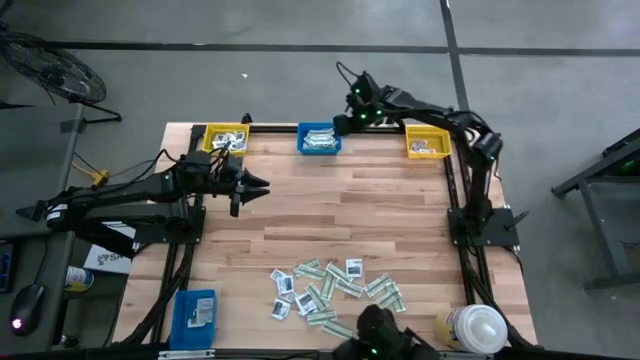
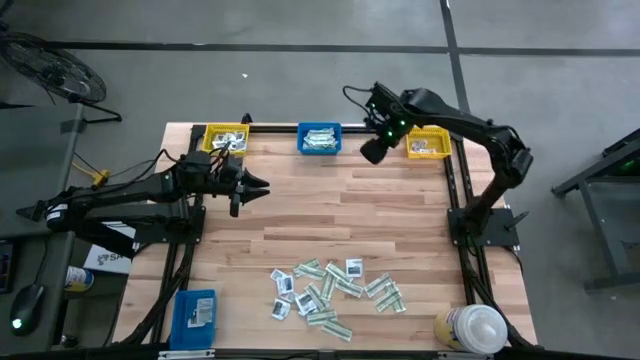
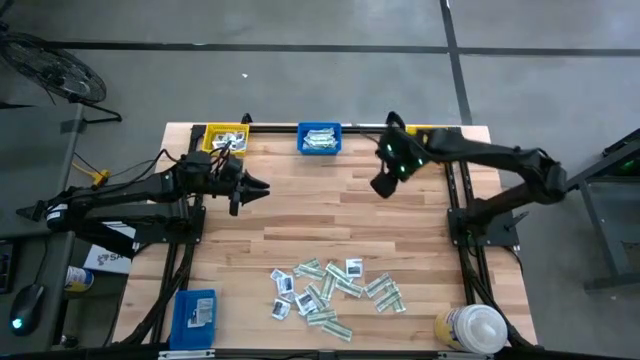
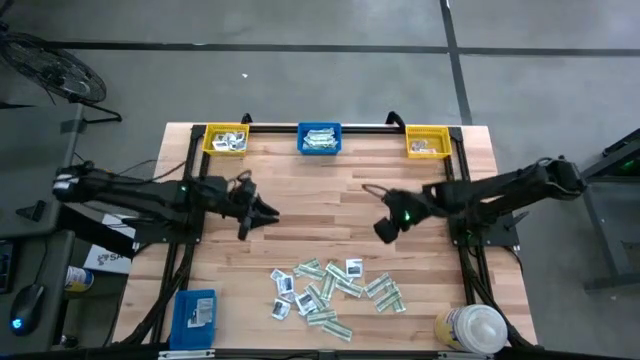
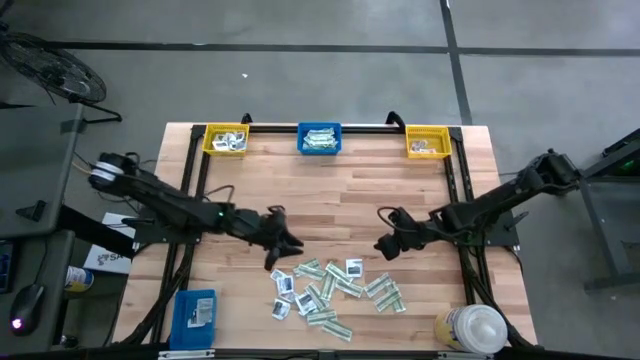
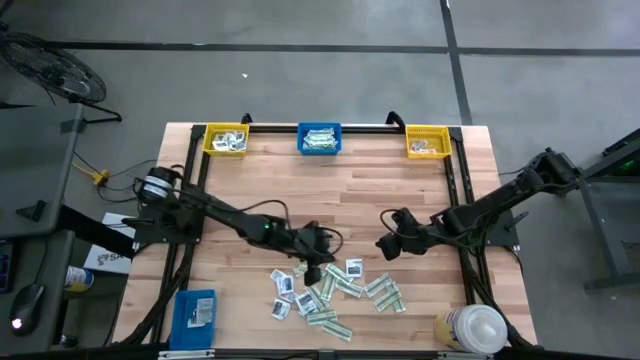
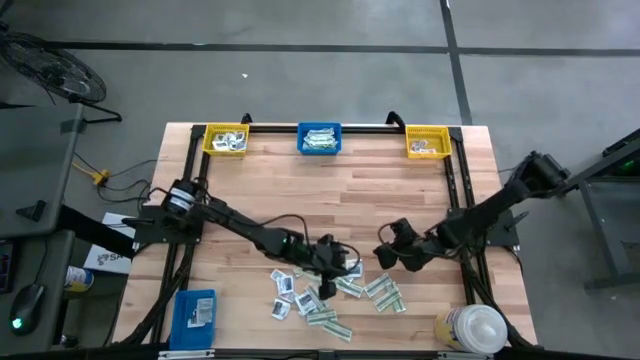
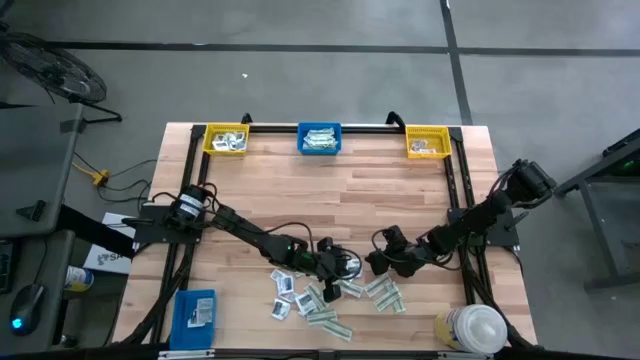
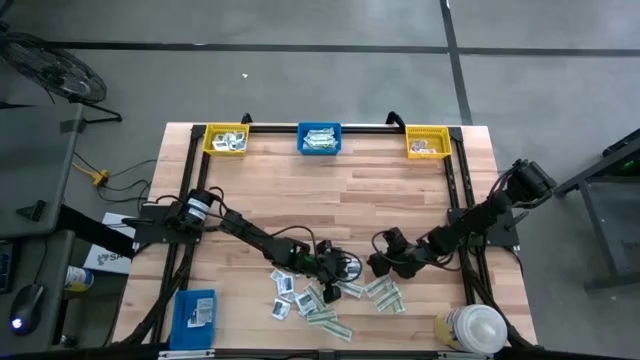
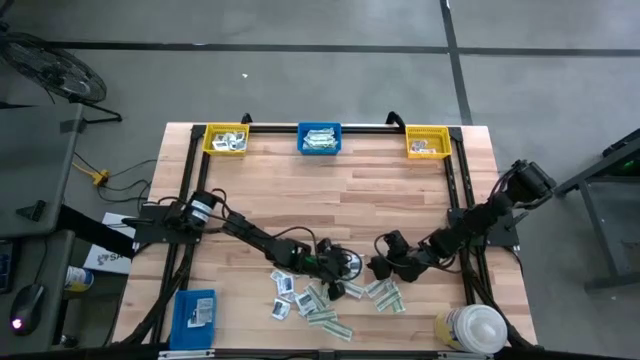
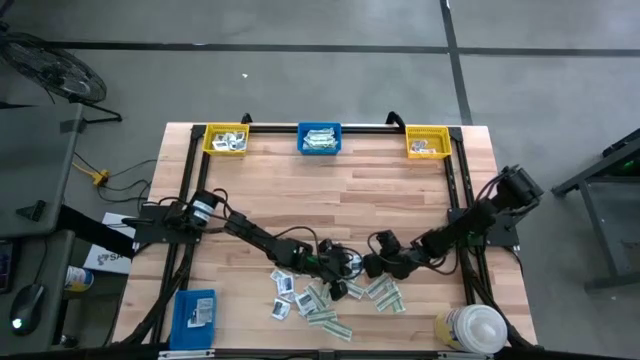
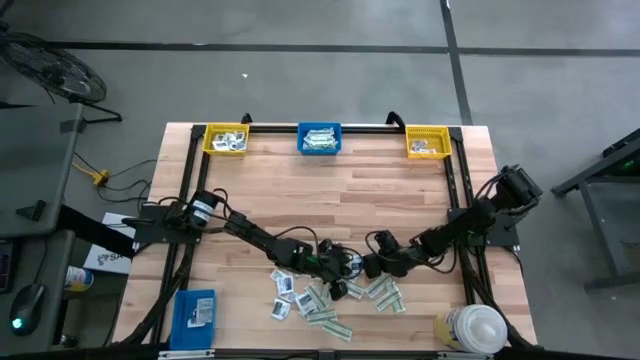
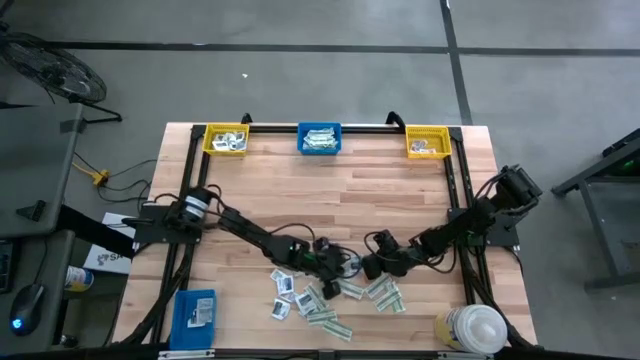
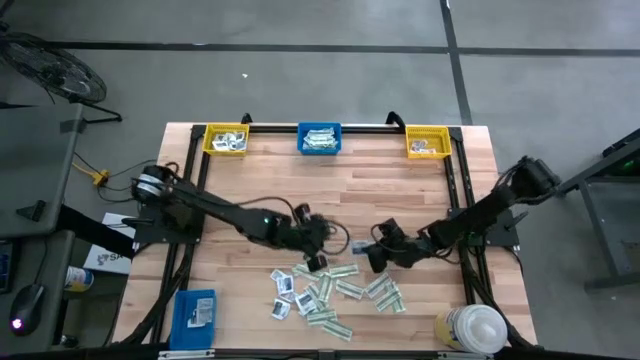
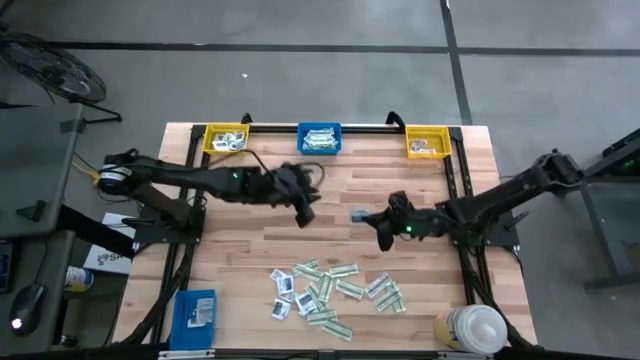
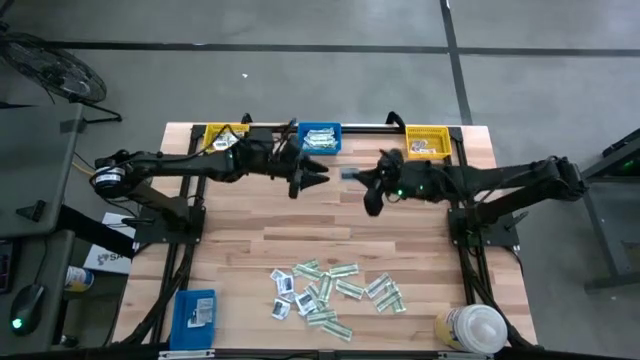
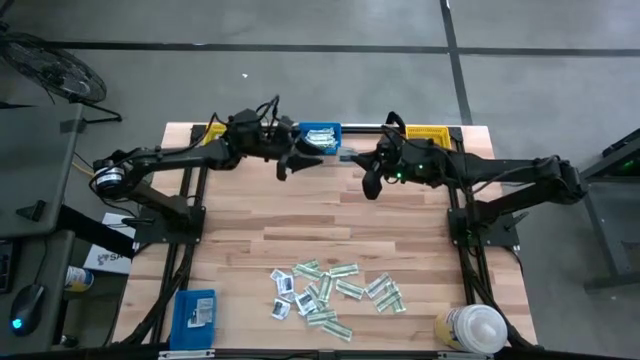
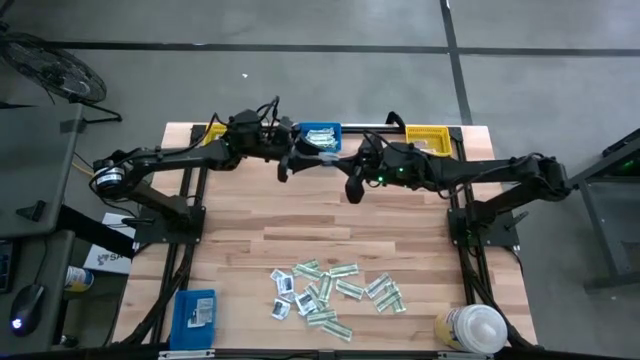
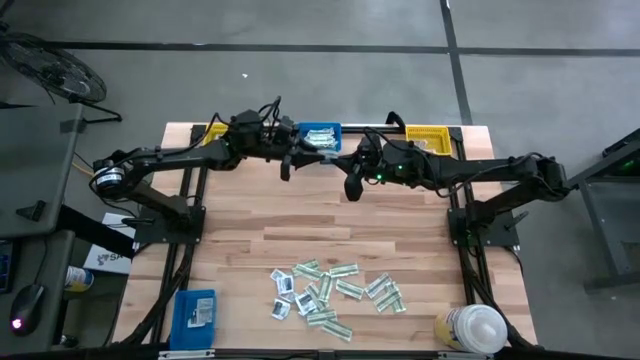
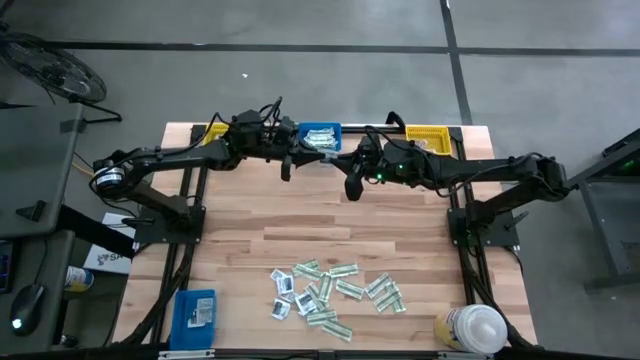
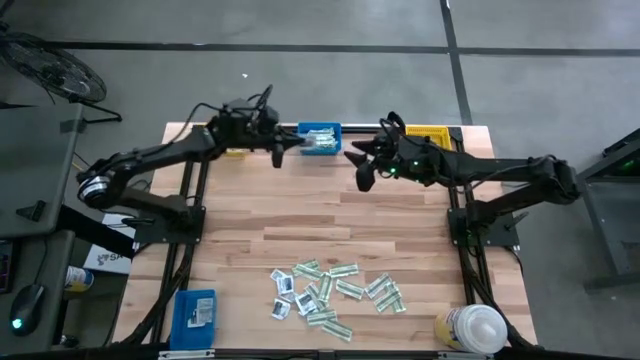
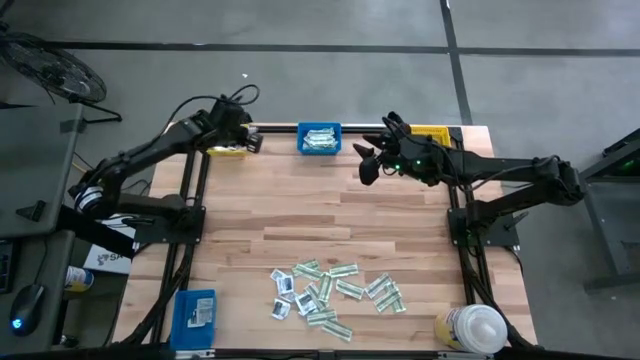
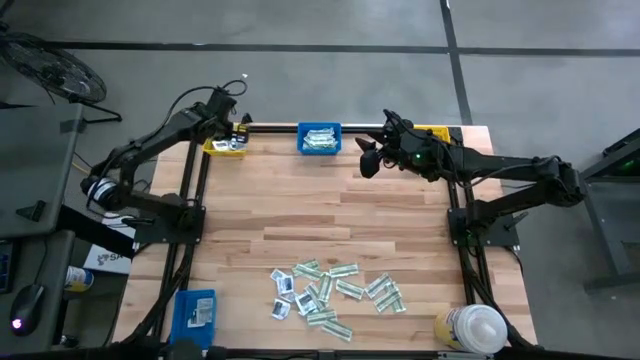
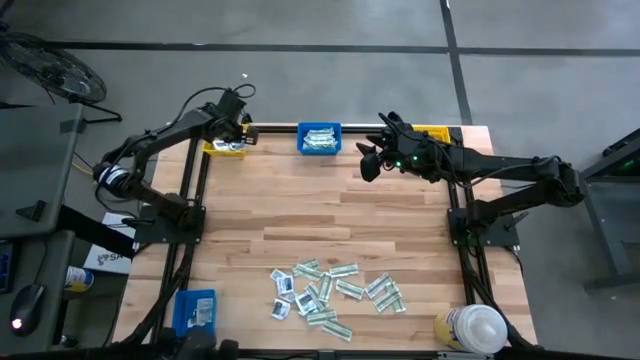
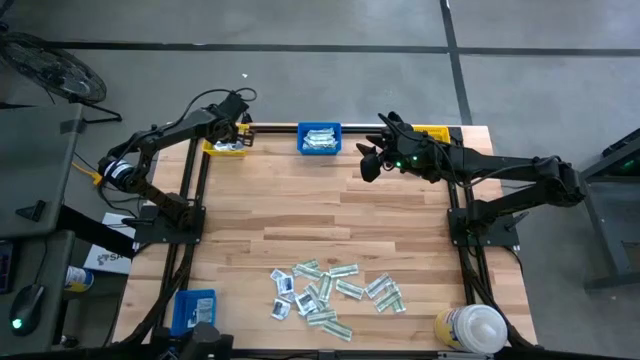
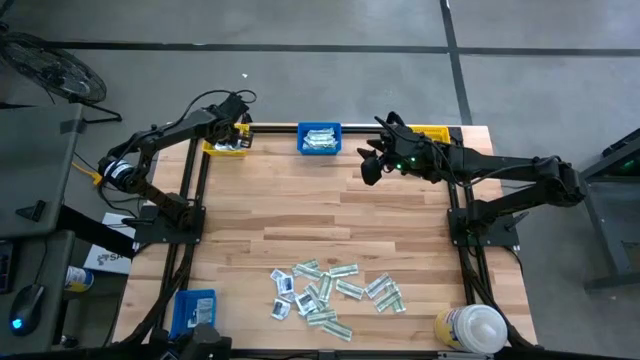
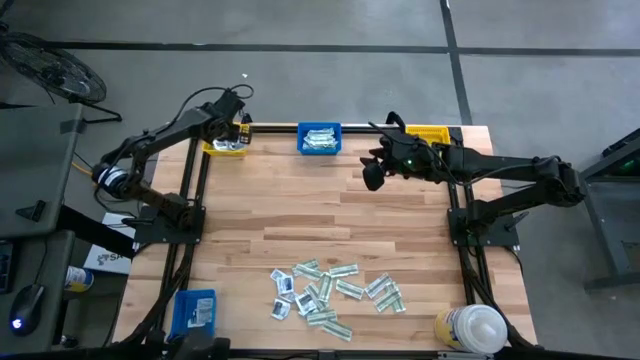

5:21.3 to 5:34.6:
Task: Pick & Place First Aid Supplies
Put the gray towelette pack into the left yellow bin

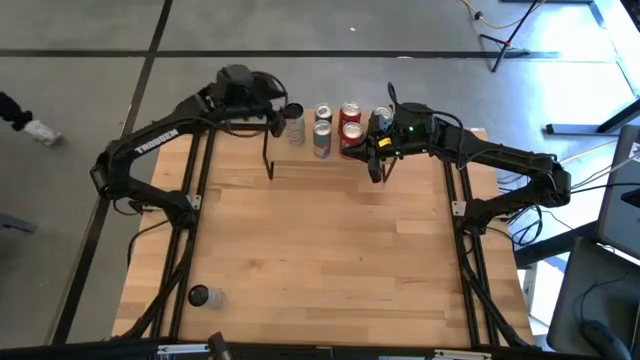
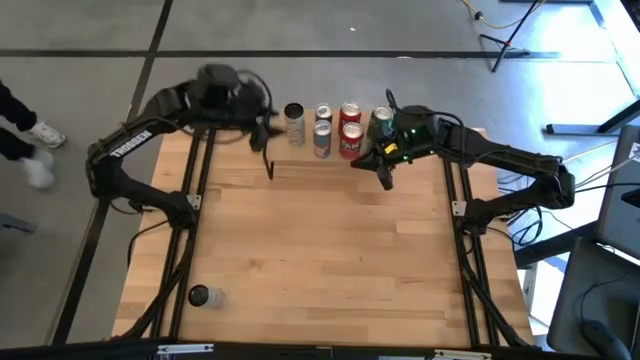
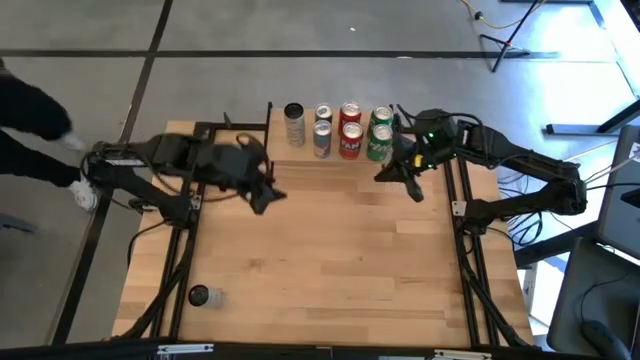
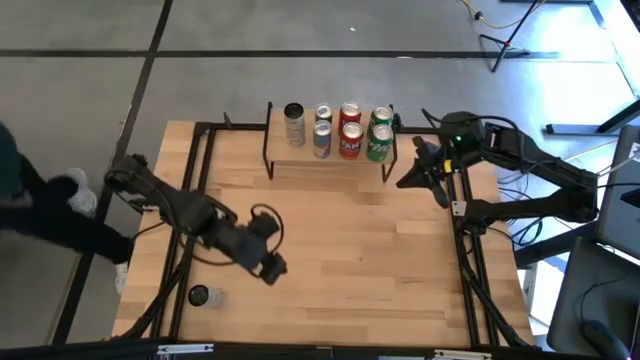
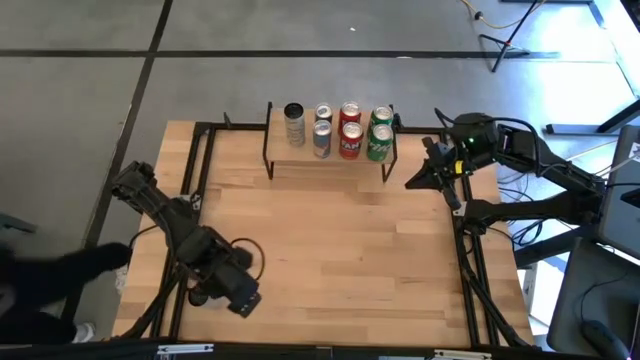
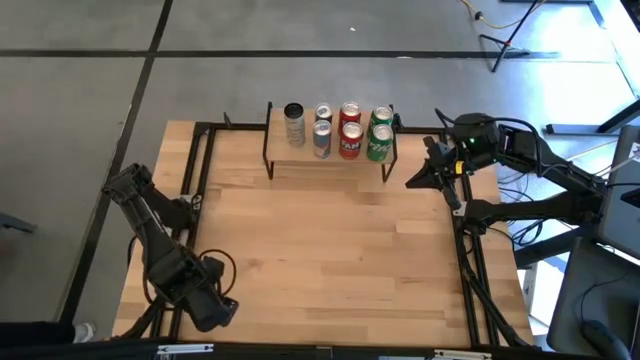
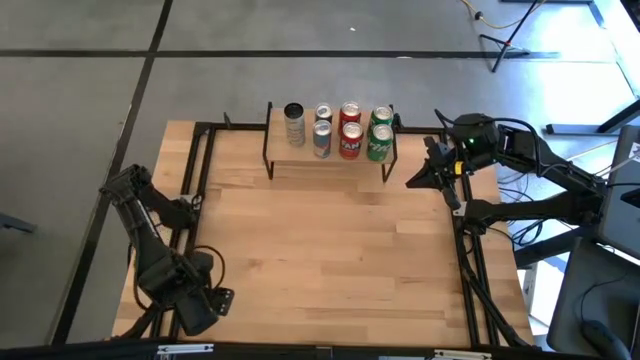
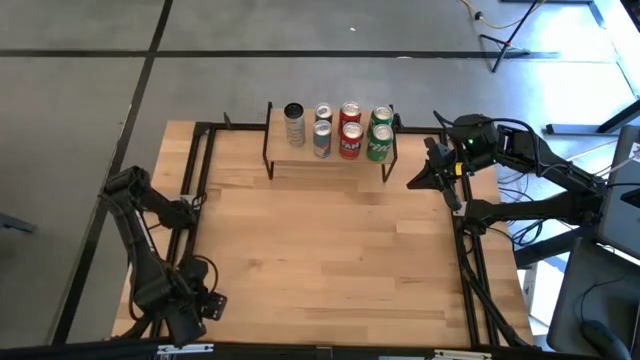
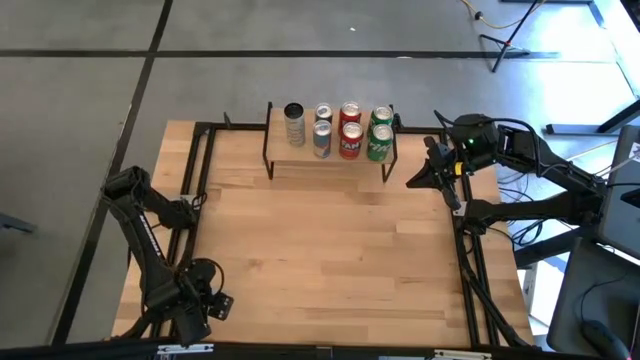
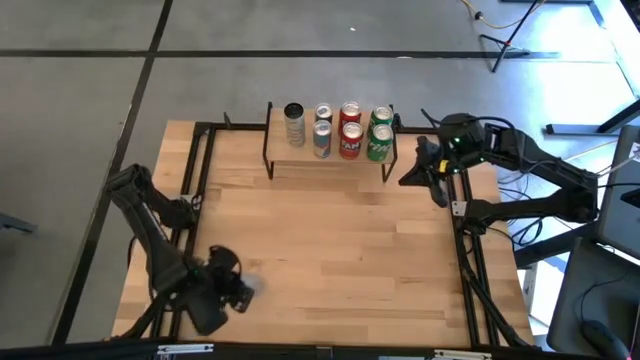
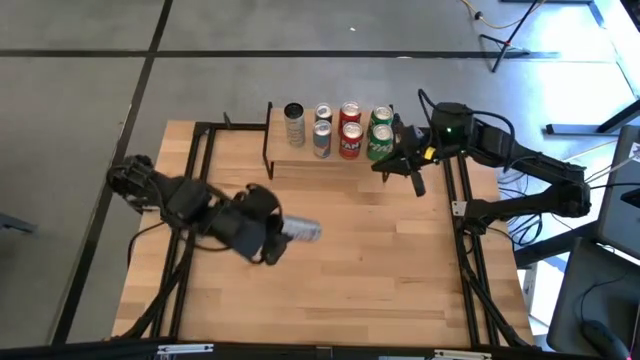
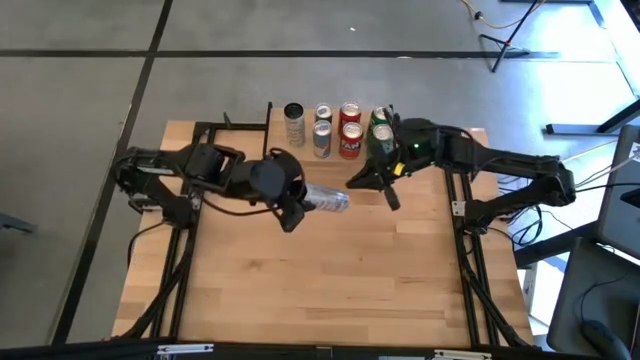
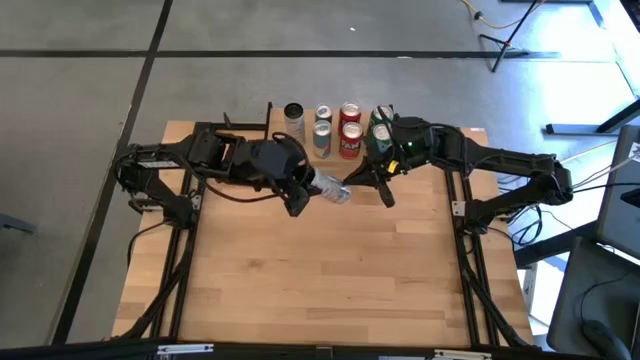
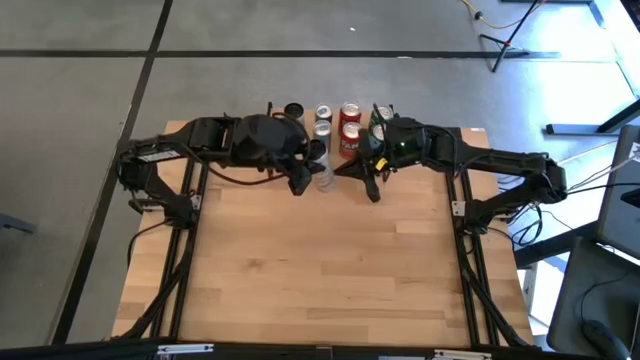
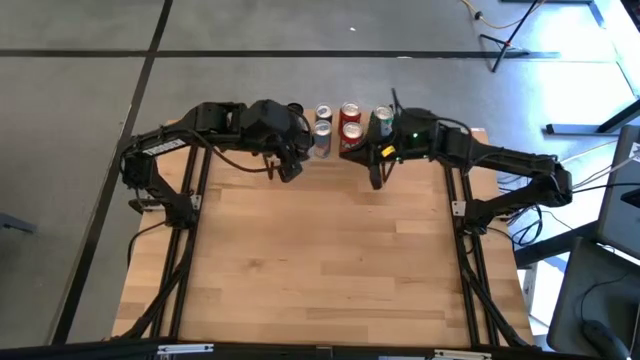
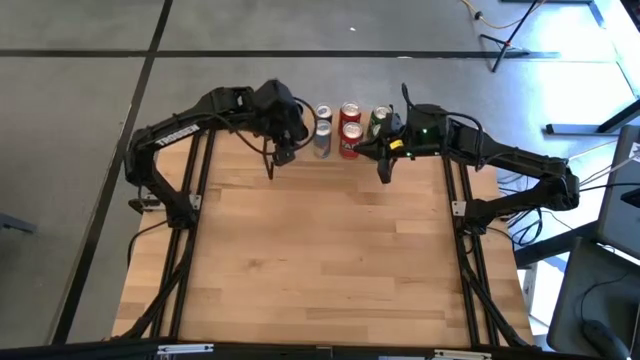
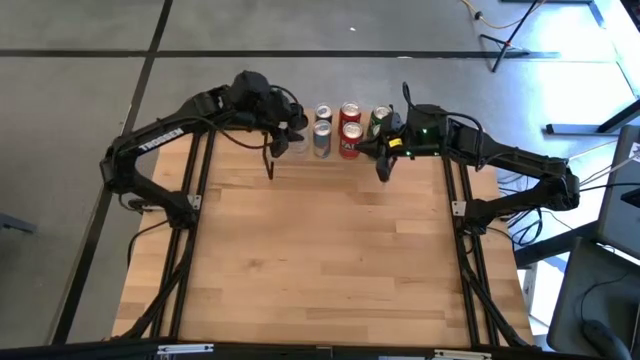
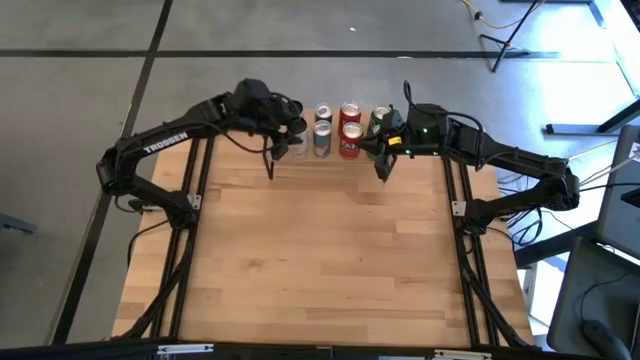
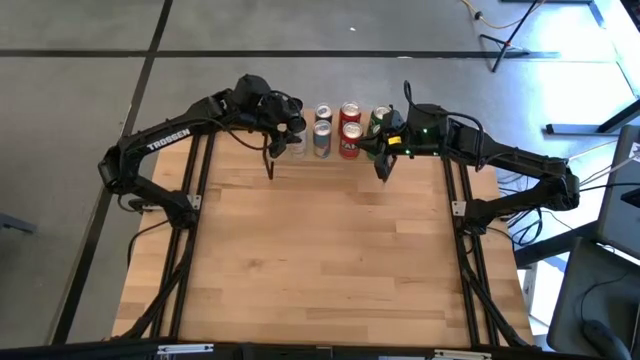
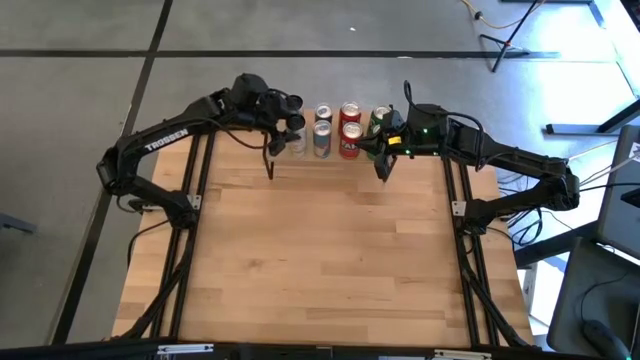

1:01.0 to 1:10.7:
Task: Place canned beverage on shelf
Put the black soda can on the shelf aligned with the other black soda can
